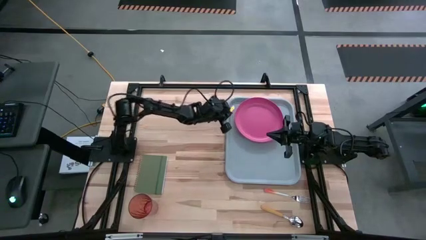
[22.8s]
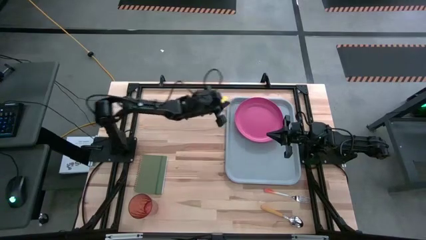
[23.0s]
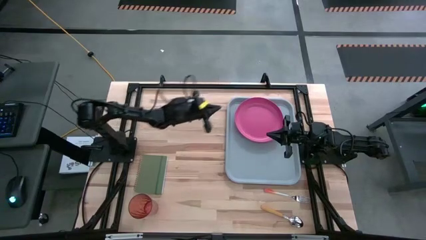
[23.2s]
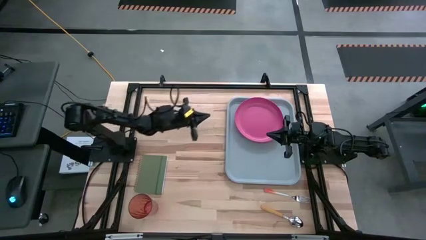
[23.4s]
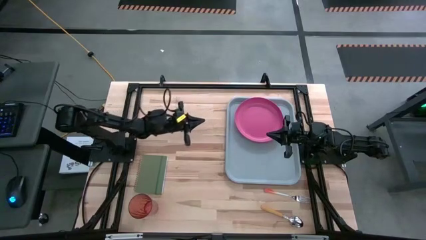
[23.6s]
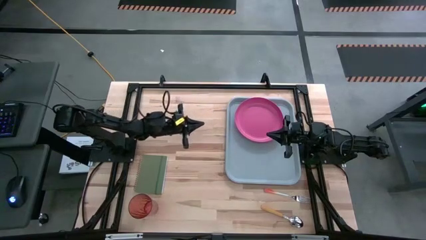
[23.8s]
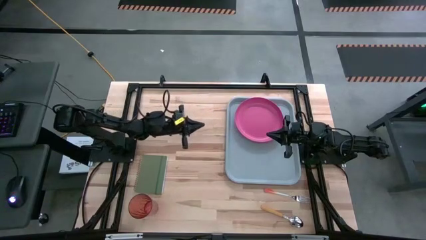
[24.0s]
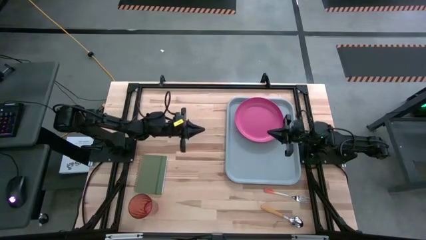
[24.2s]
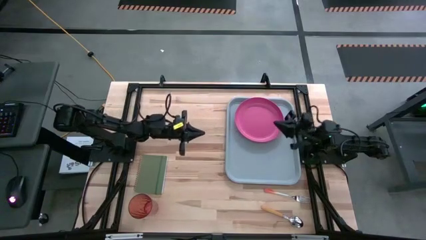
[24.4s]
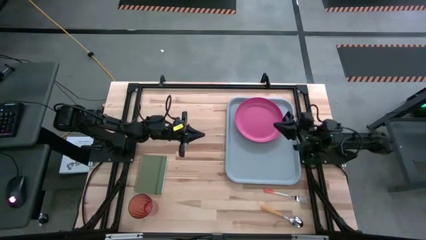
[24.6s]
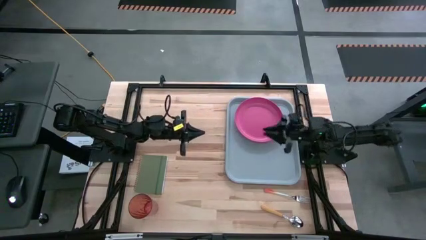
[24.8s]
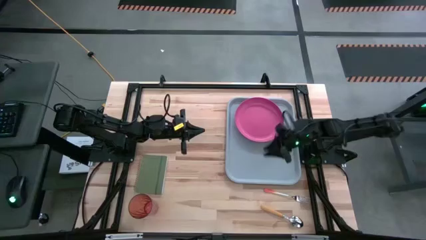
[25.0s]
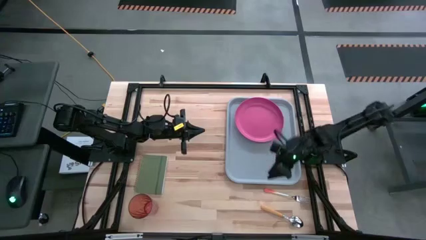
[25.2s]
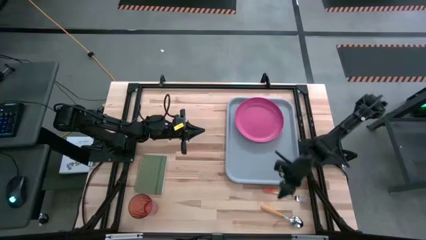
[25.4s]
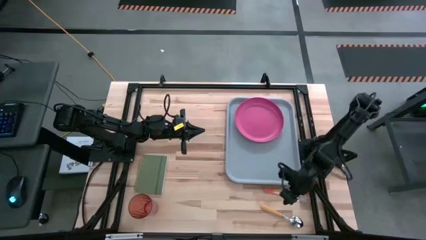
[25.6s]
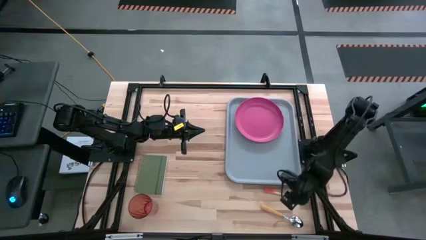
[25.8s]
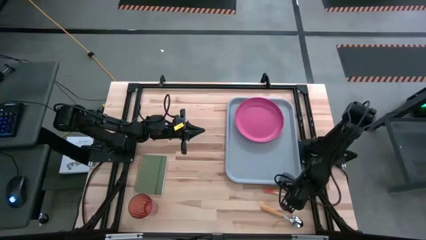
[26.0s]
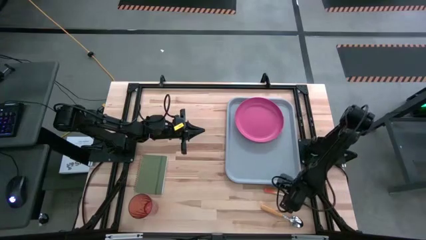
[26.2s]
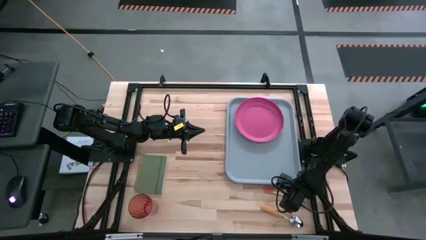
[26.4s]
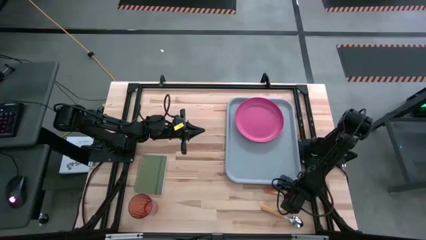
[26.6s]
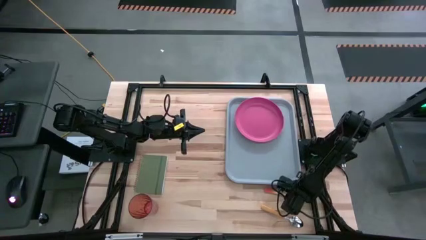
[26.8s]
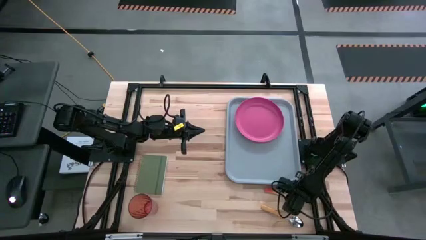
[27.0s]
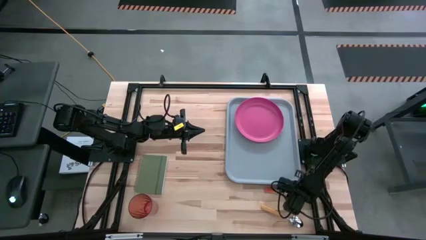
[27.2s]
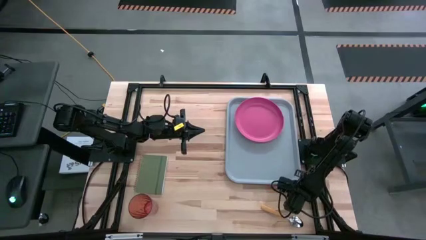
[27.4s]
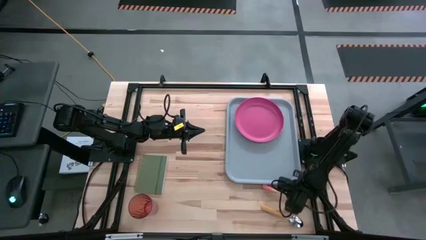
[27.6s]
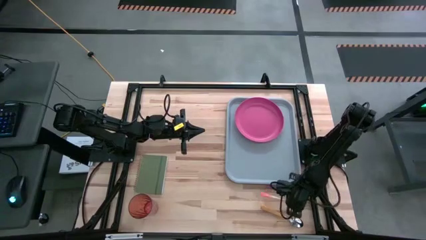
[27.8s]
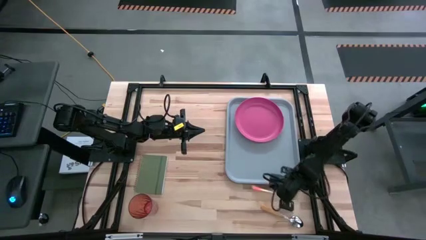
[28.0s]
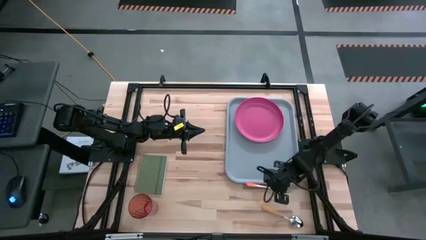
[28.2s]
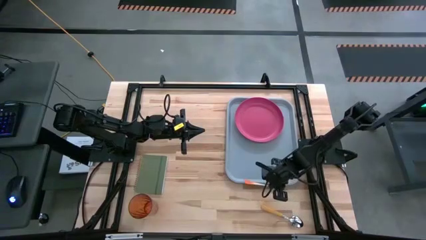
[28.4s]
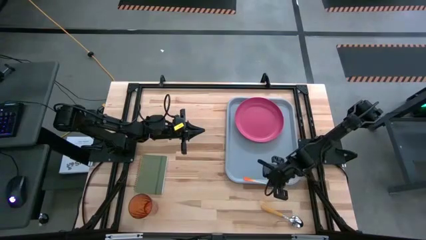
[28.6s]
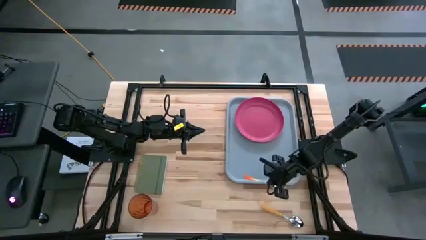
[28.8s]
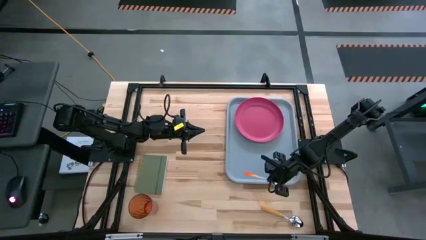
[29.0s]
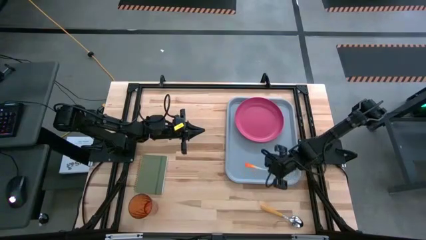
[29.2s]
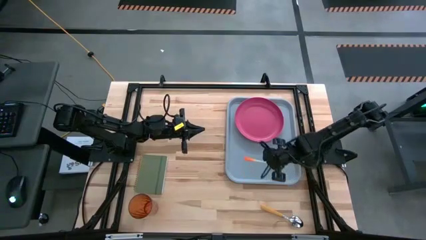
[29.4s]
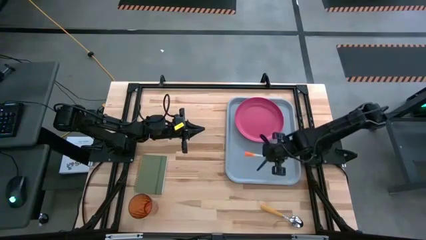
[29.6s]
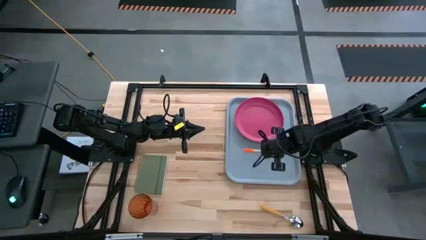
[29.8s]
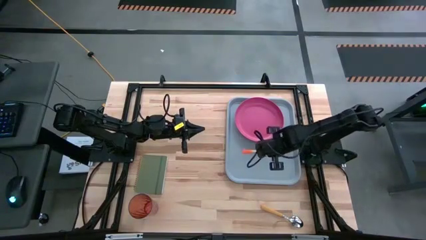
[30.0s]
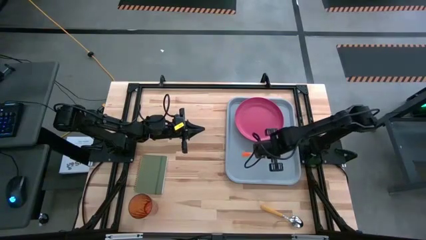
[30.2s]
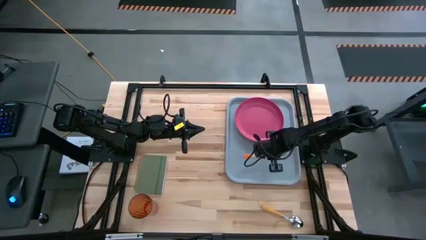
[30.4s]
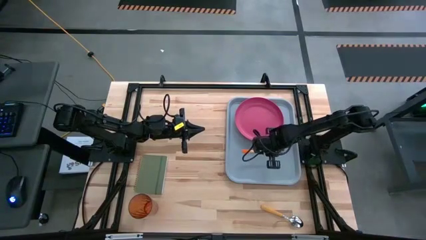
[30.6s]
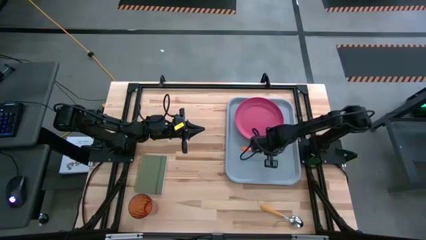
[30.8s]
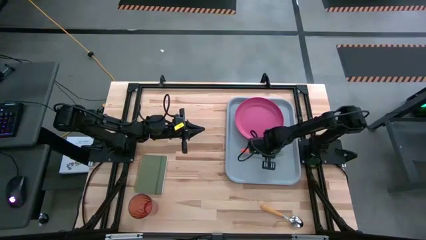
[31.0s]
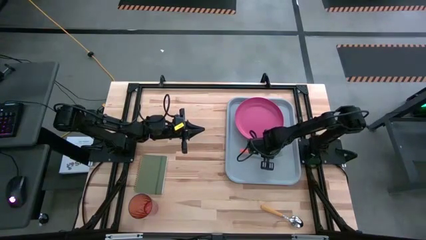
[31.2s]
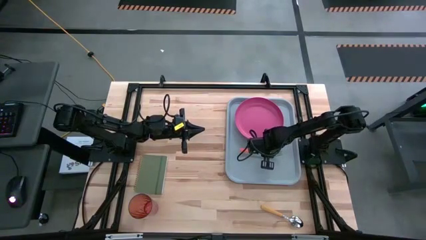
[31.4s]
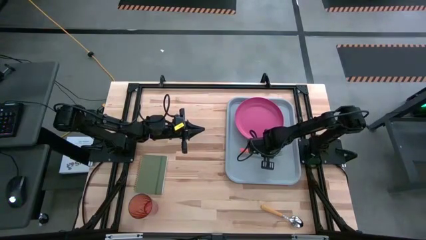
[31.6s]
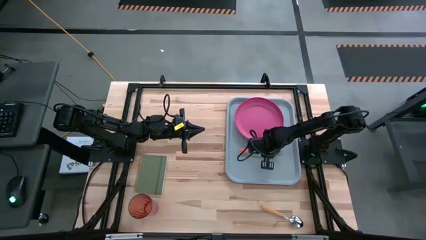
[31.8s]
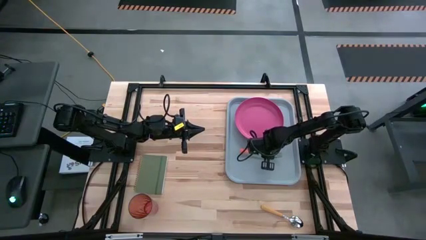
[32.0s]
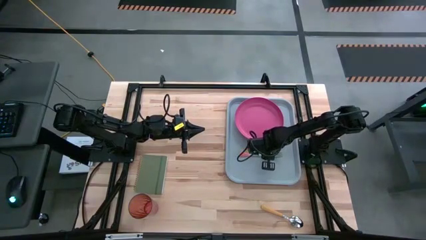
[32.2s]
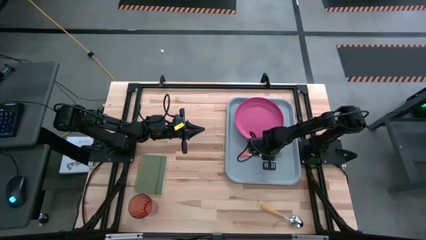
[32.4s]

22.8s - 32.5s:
Task: Pick and place plate/cup/fork/spoon on tray
Put the white and orange fork to the right of the pink plate on the light blue tray

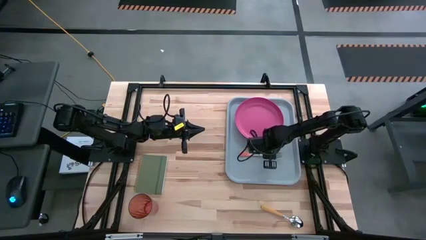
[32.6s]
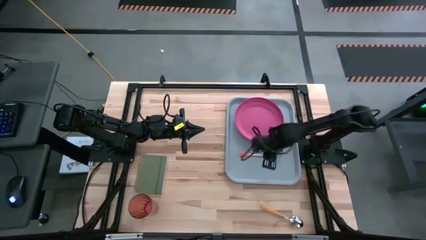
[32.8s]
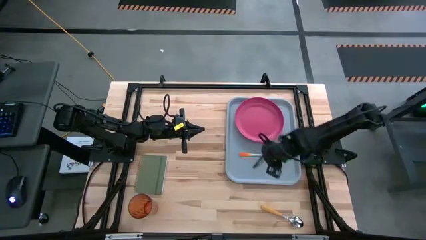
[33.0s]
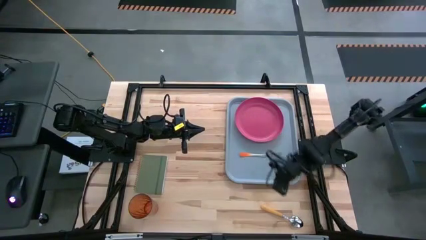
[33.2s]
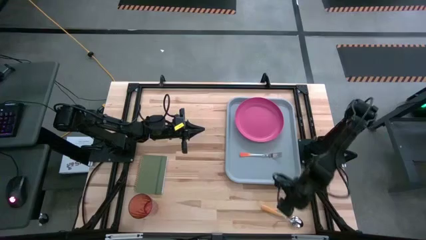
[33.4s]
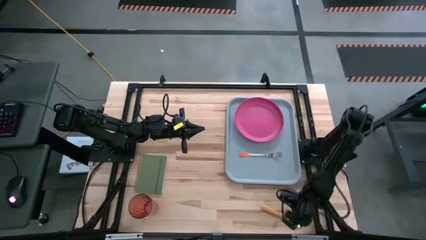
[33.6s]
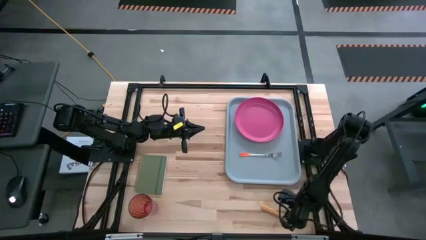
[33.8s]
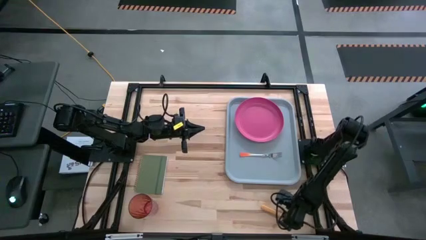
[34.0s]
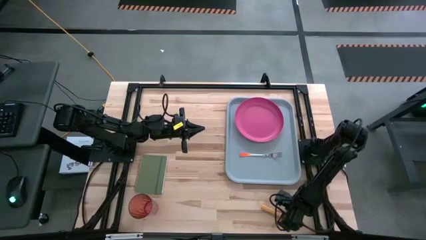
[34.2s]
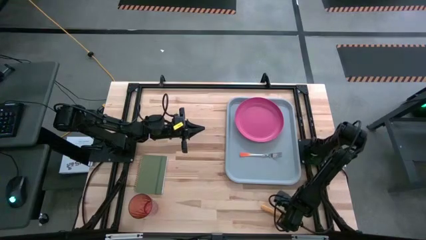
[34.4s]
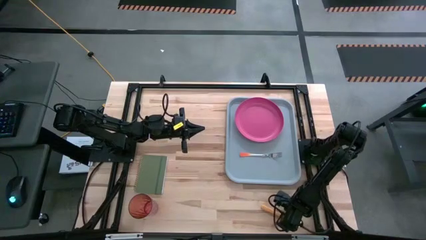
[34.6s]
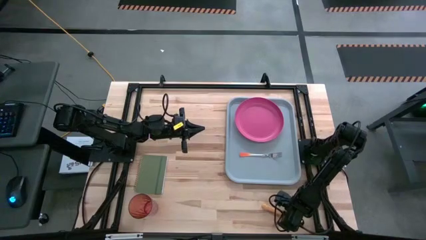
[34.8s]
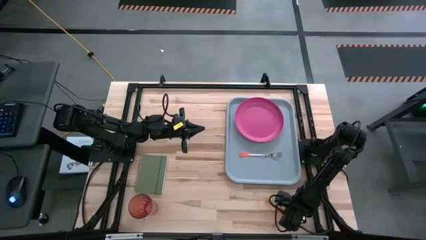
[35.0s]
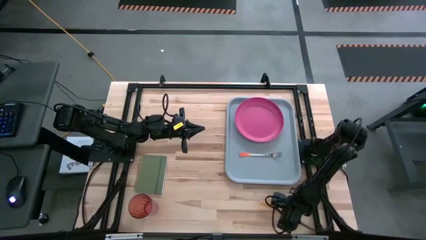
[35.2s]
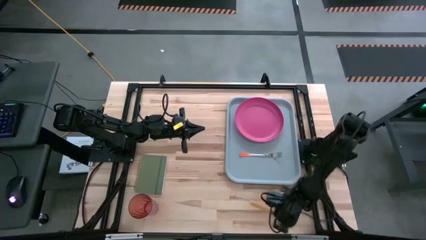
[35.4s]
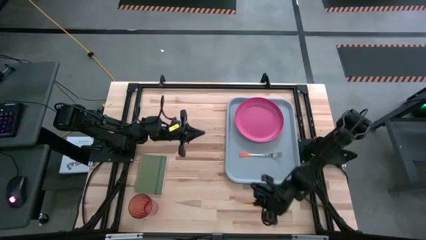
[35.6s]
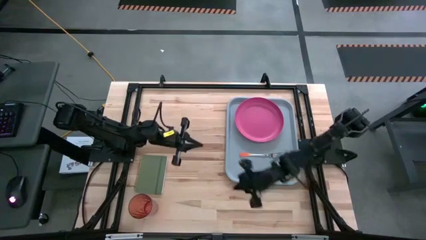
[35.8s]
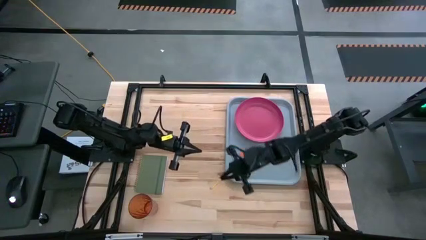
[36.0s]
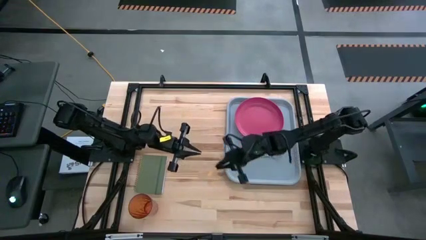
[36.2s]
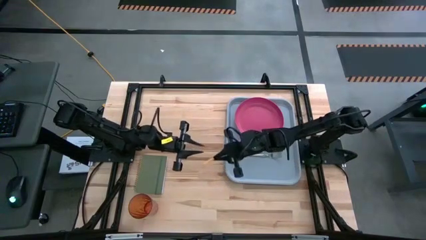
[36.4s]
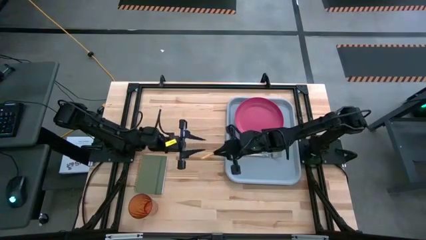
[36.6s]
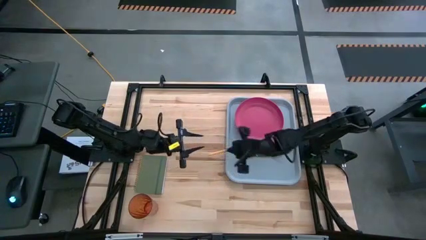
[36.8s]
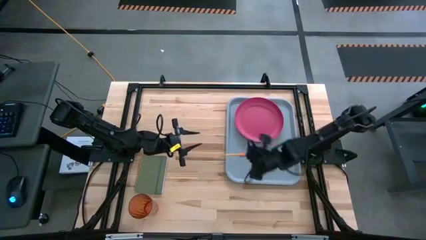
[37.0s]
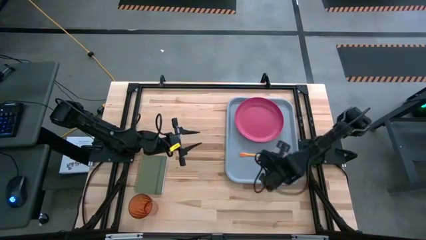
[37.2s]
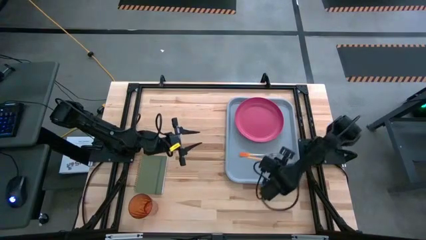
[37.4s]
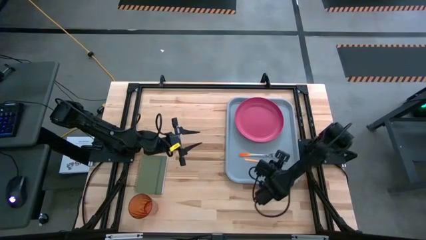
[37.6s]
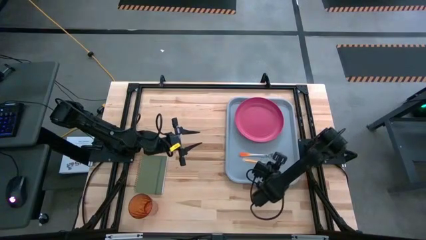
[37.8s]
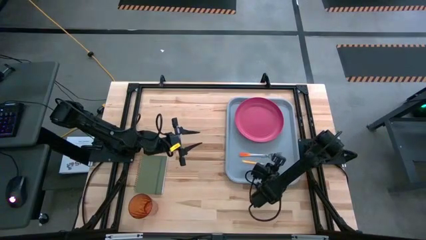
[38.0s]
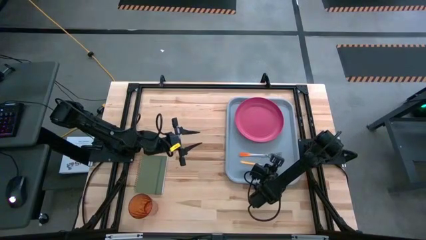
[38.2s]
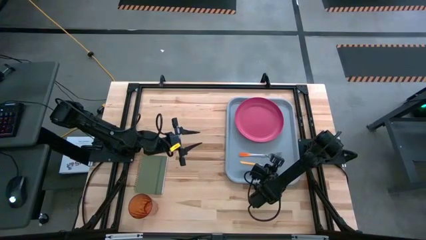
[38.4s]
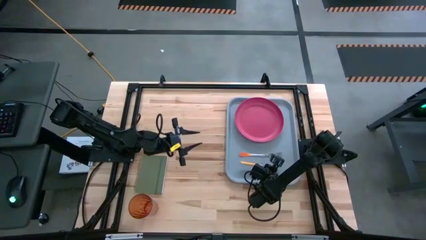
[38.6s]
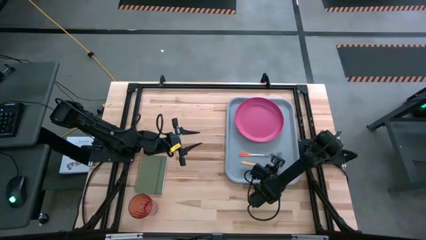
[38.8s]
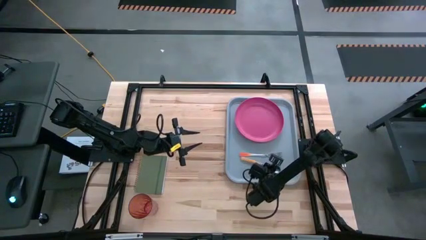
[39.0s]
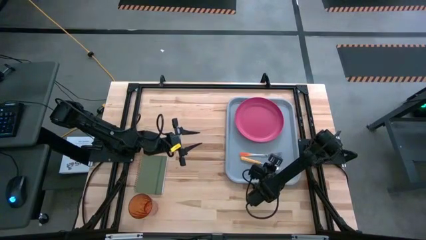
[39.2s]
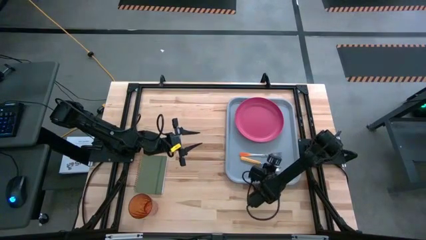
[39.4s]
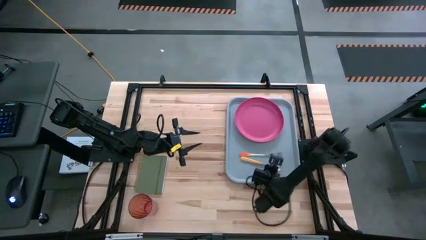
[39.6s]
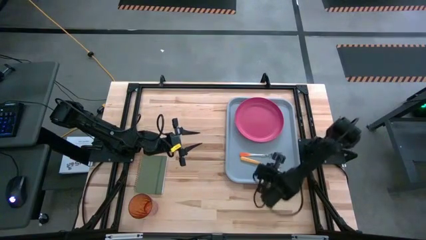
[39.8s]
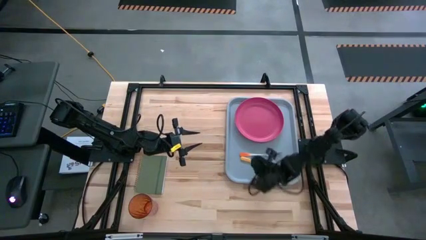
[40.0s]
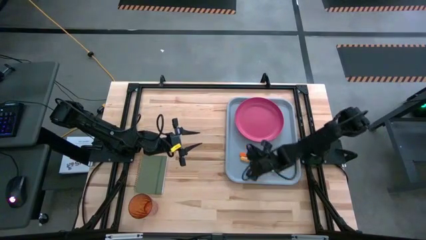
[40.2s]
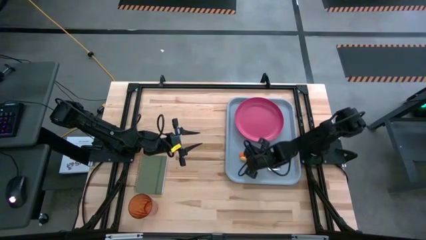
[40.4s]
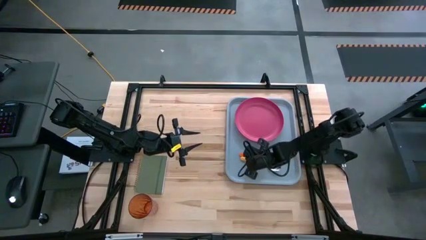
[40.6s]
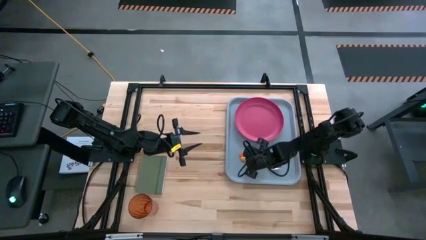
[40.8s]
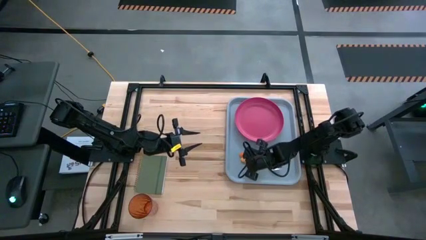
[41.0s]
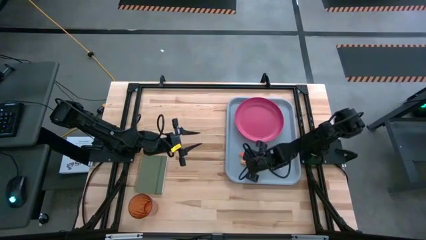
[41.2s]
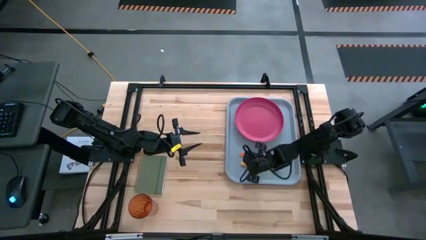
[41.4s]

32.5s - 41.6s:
Put the yellow spoon to the right of the orange fork on the light blue tray
